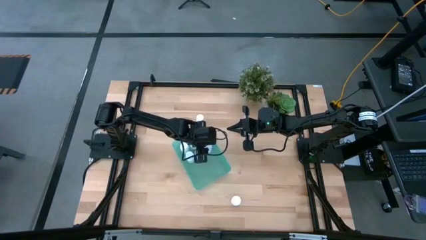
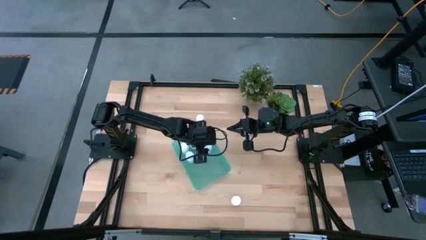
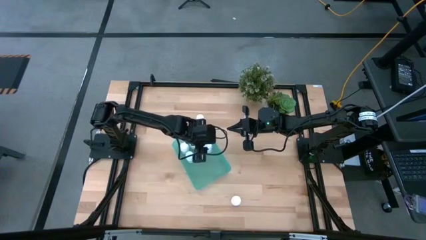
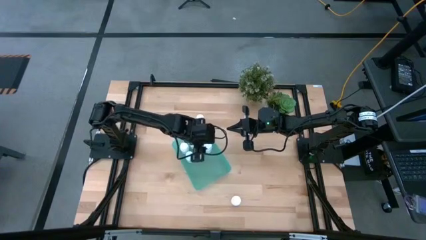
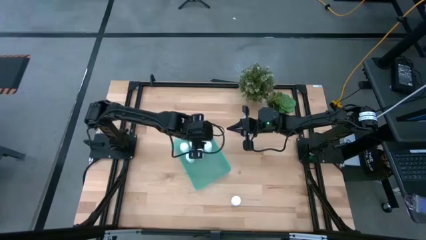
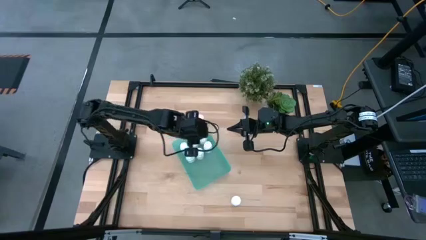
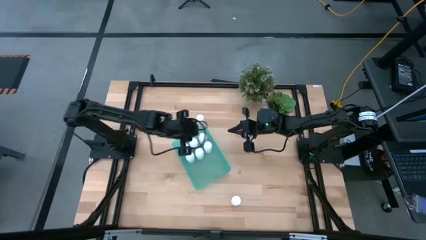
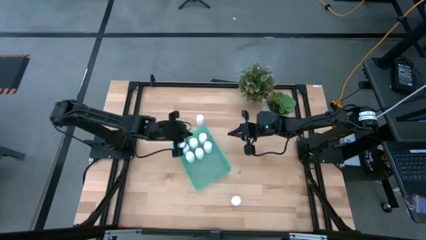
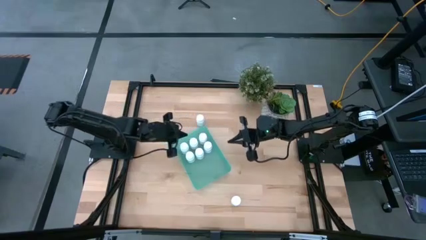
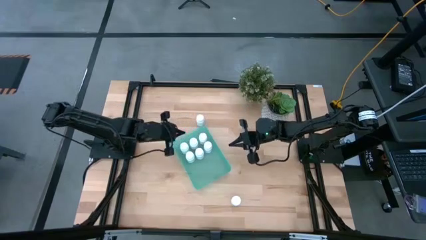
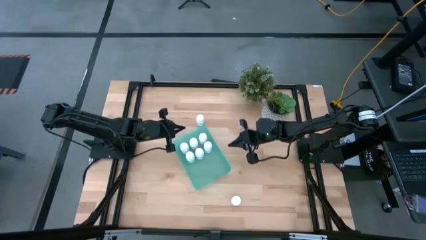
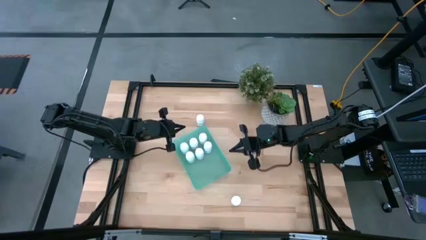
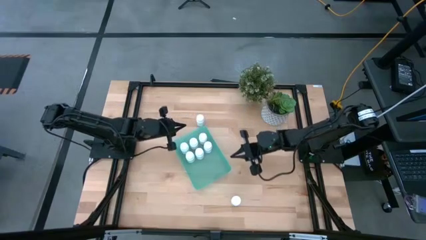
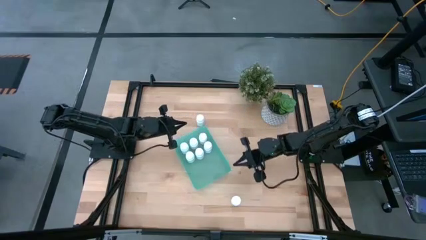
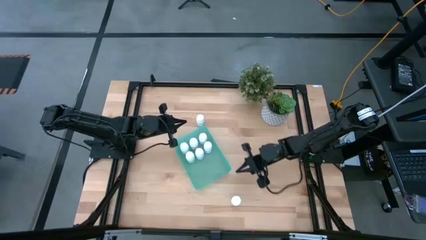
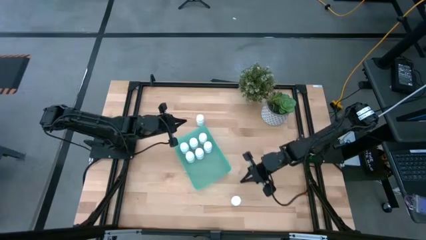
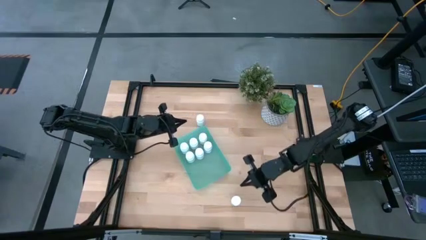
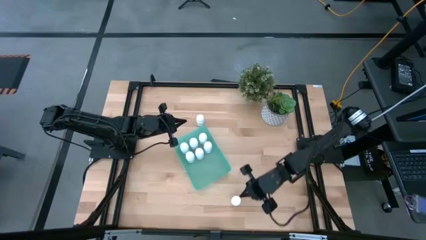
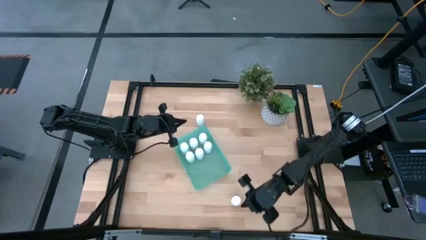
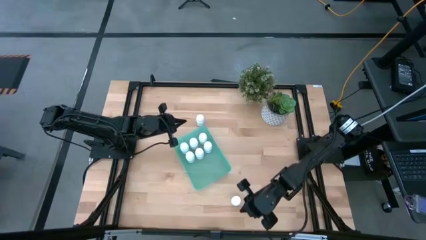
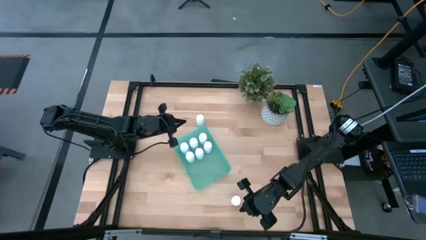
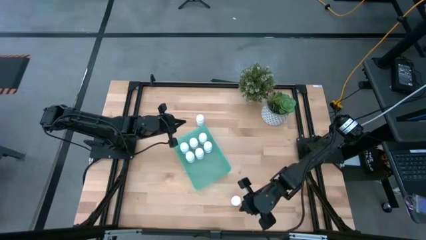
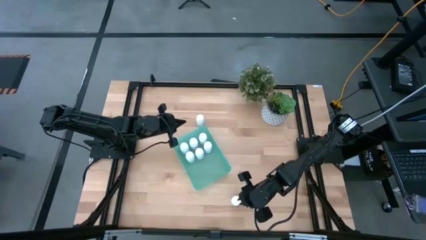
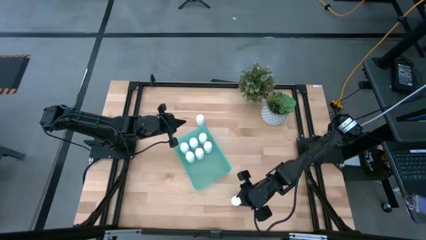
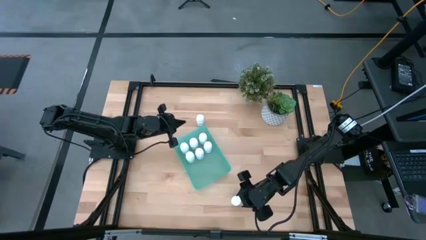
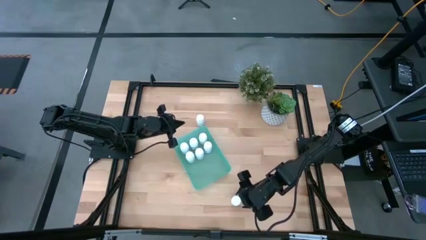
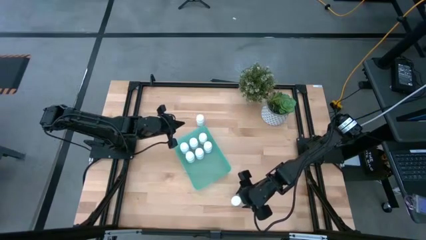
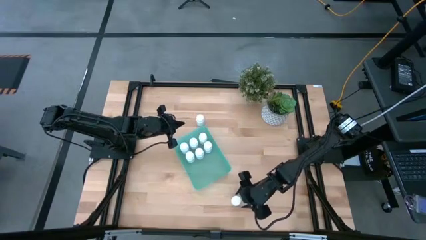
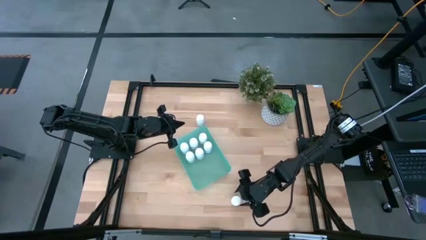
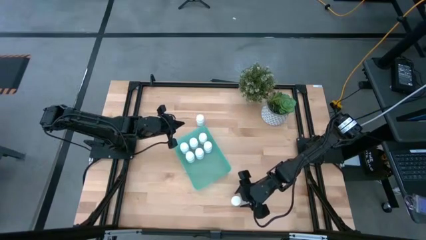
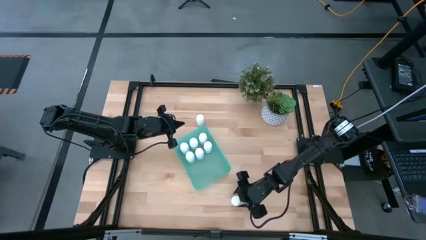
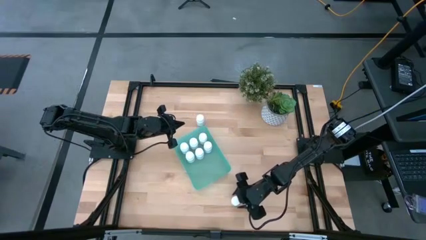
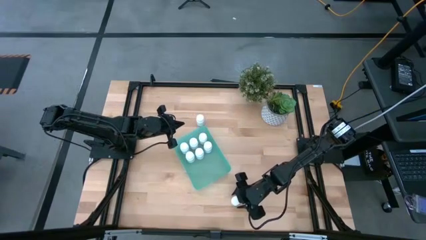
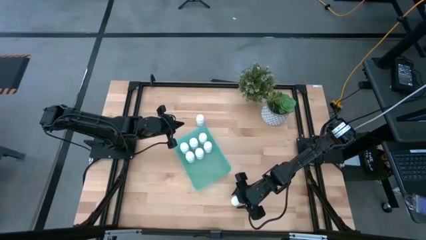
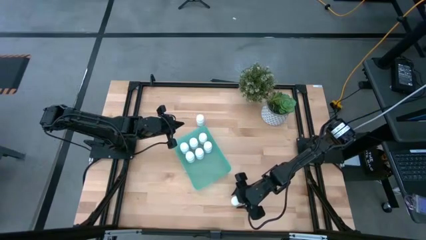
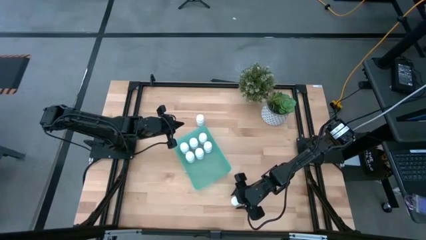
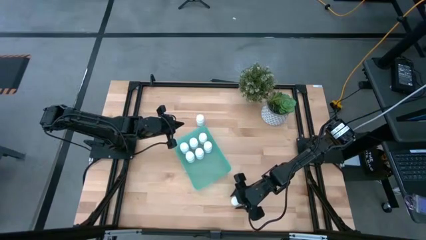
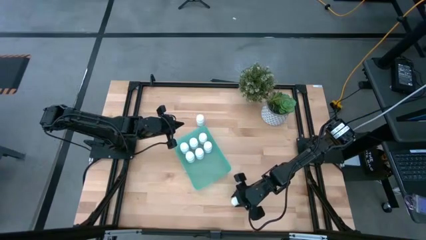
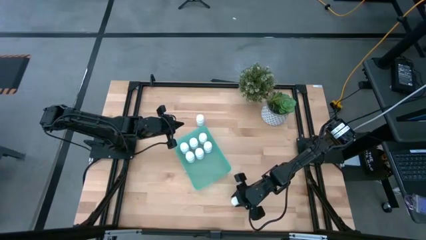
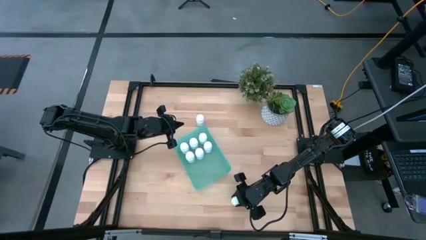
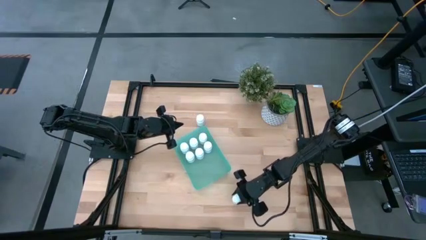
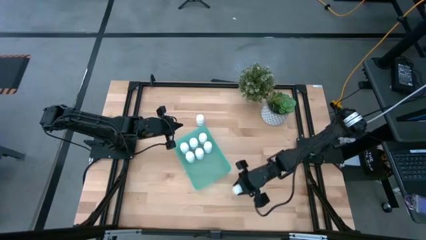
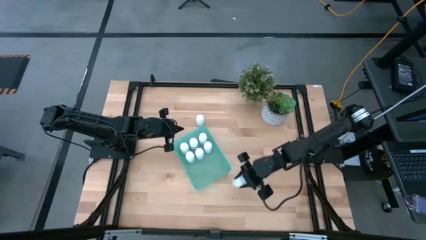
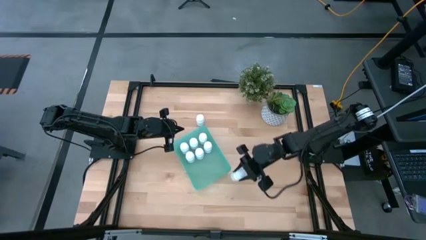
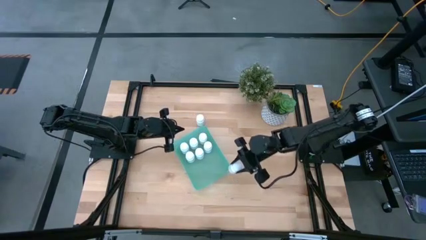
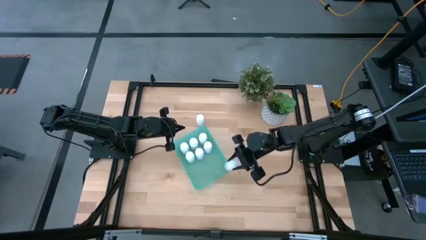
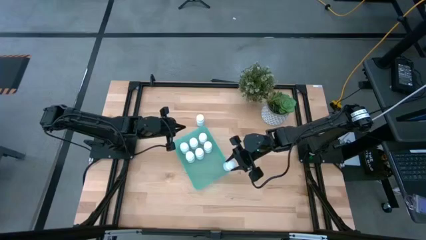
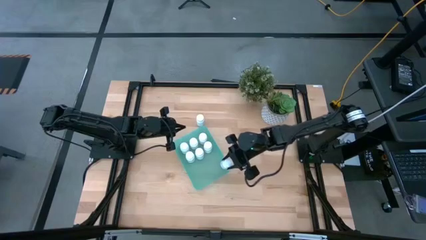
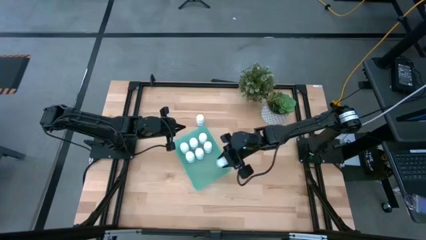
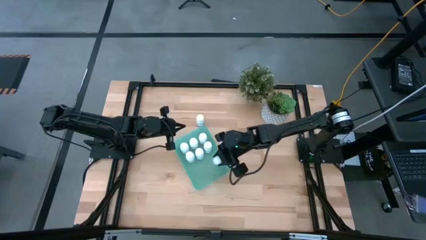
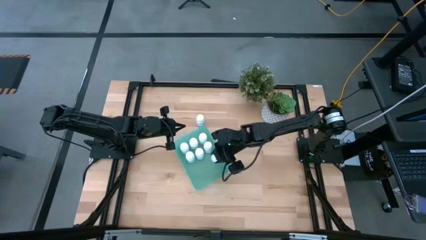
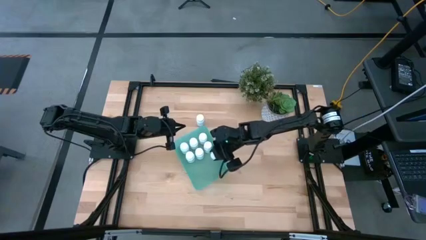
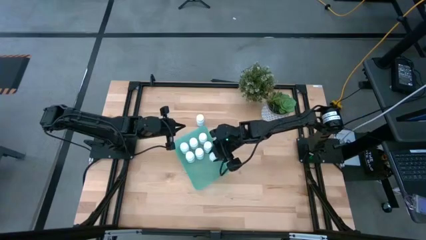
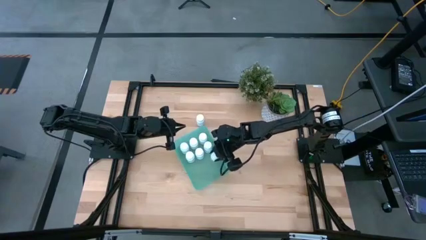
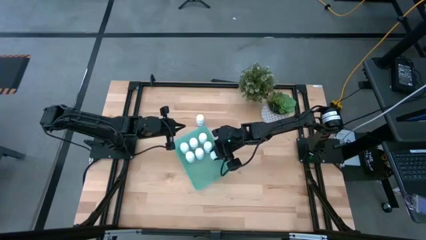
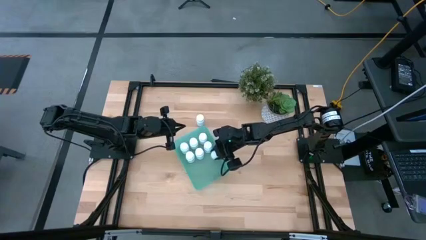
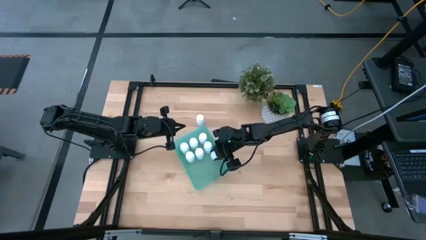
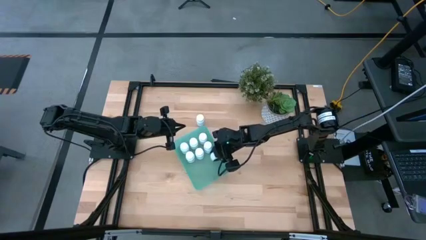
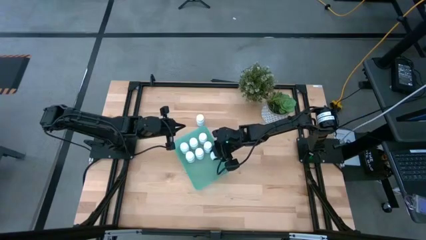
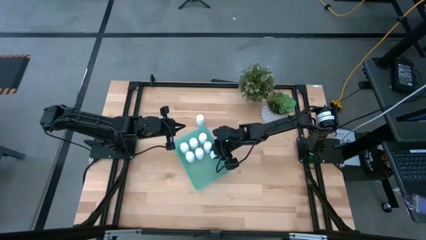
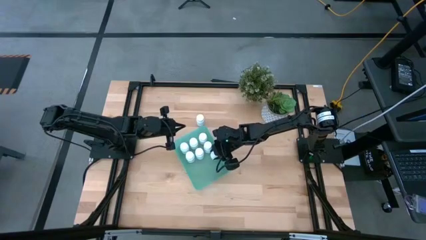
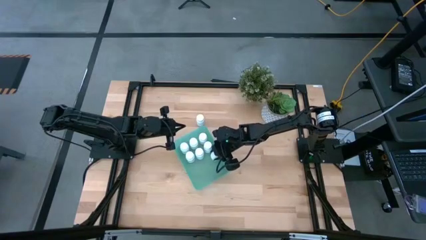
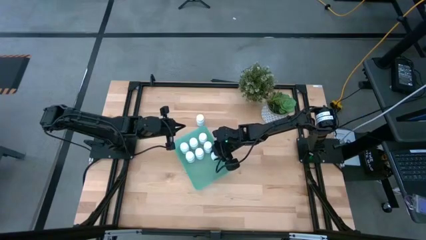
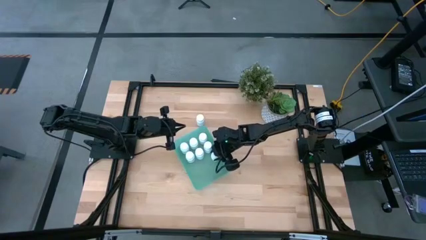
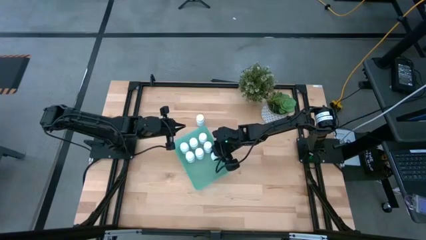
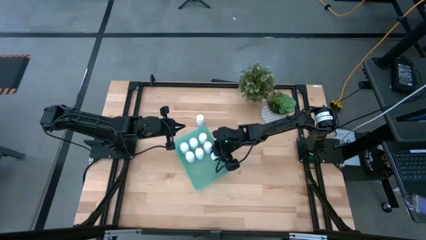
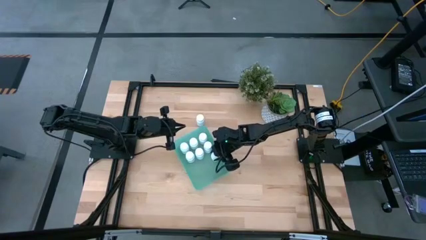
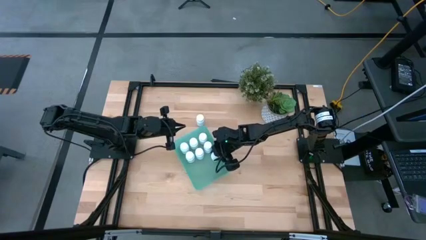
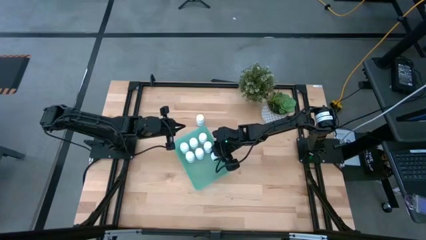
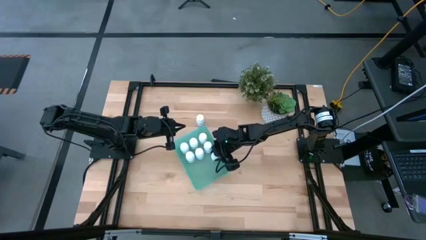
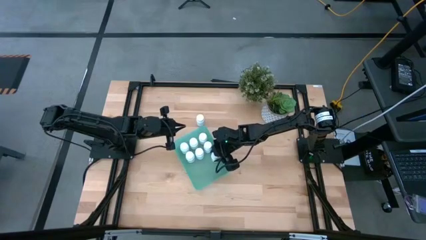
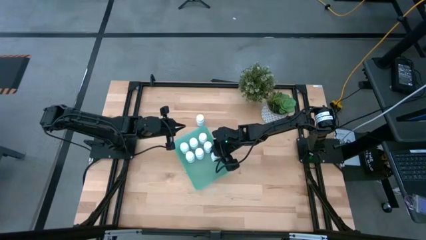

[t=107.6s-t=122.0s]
Task: Pick and place pill bottles into a basket
Put the white medicine bottle into the green bin

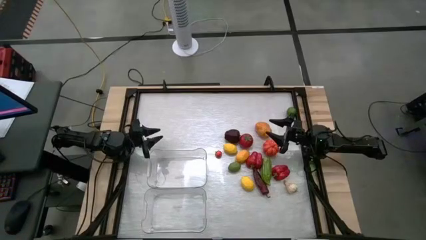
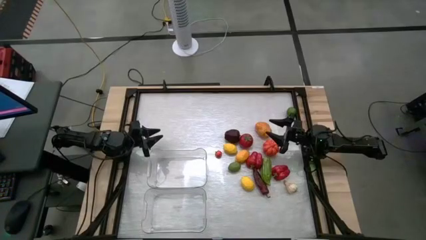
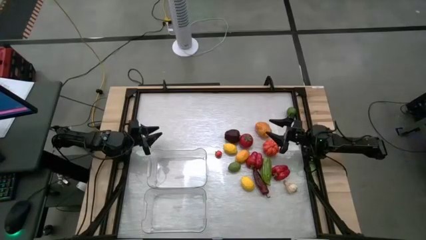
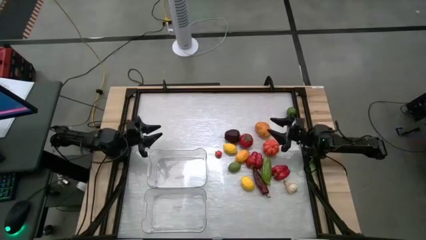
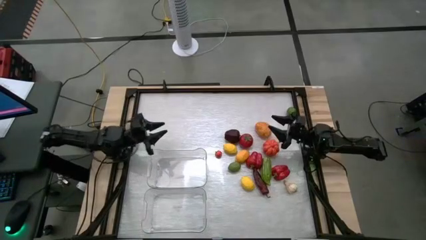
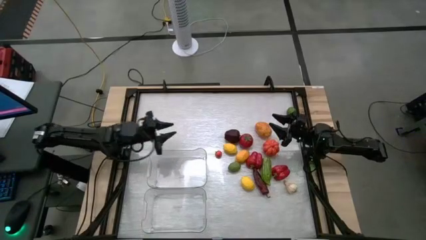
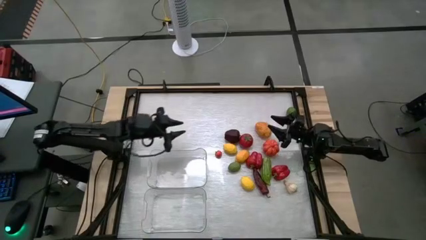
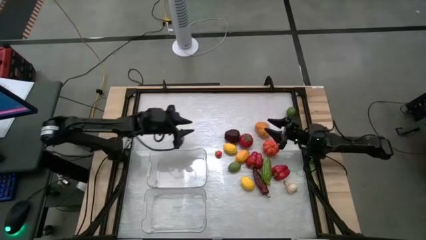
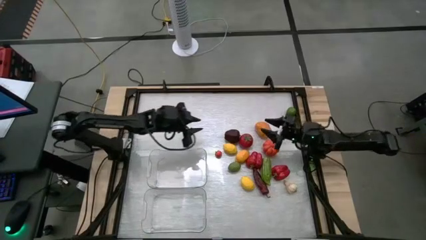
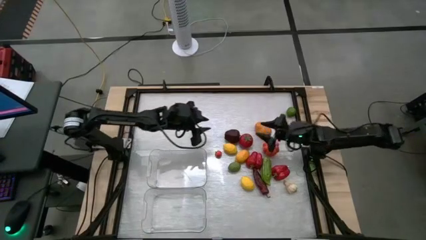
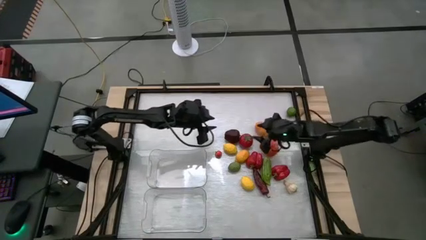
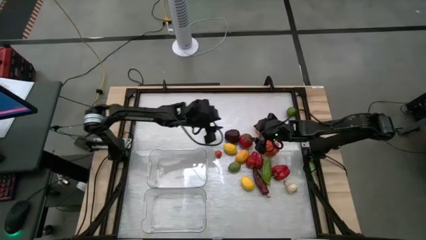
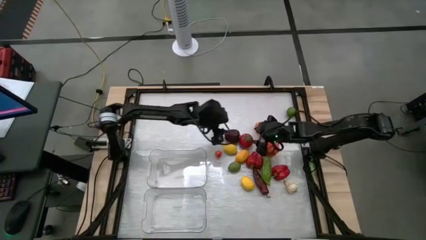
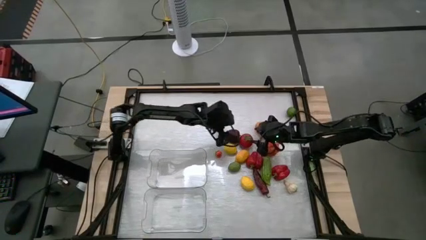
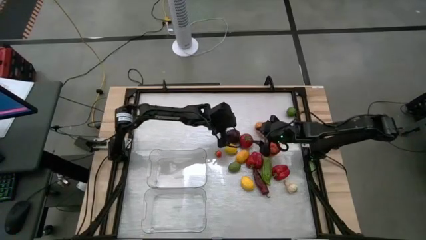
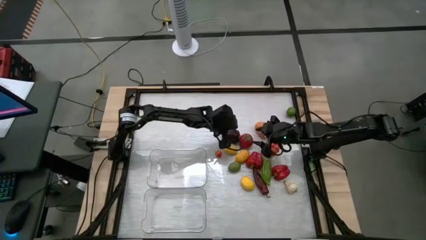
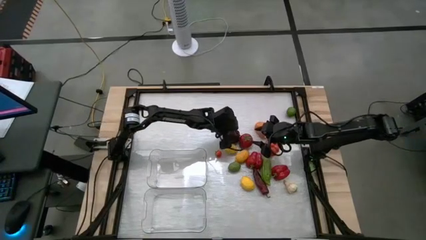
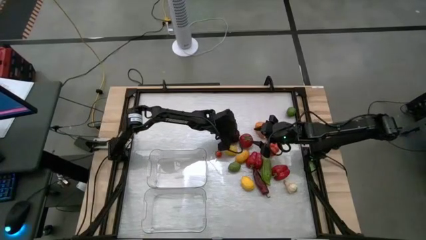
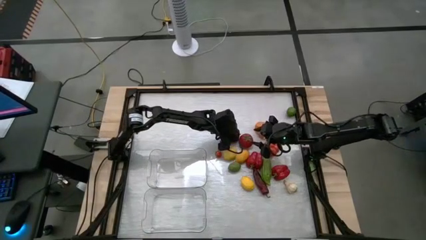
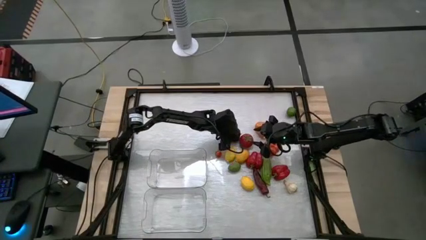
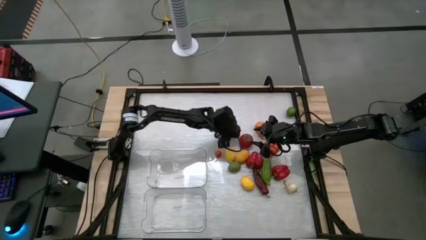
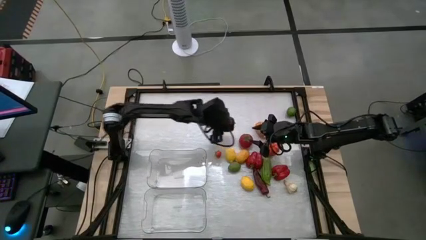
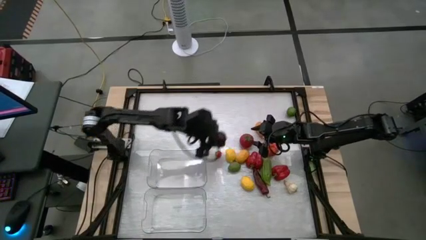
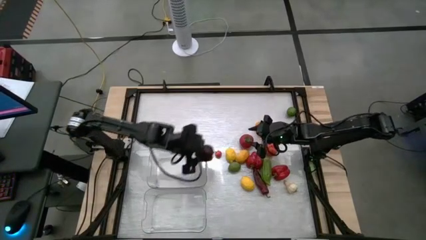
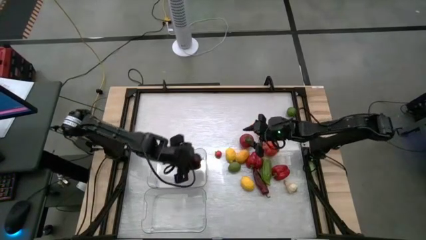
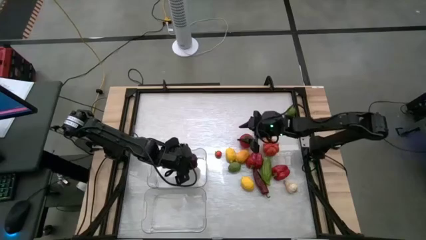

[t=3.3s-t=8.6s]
Task: Sort produce into baskets
Put the apple into the top transparent bin
